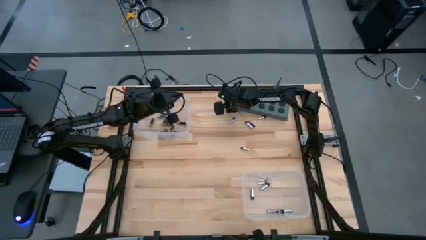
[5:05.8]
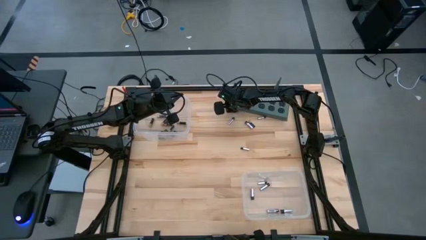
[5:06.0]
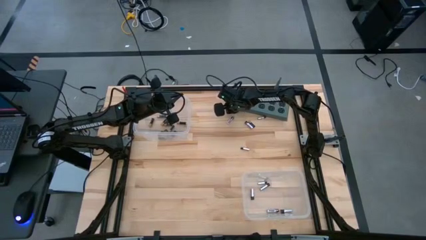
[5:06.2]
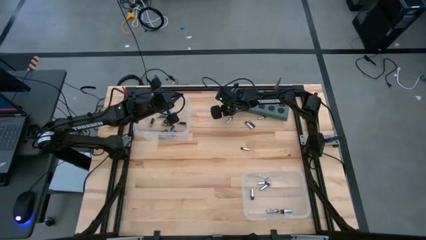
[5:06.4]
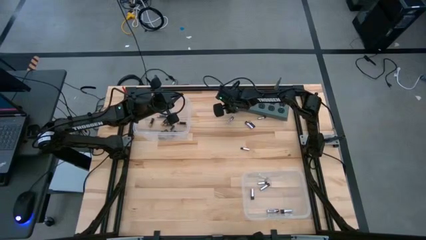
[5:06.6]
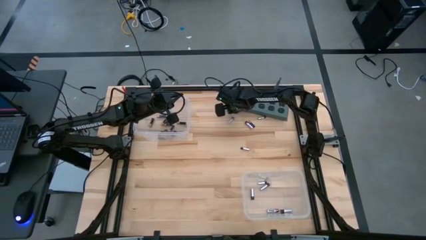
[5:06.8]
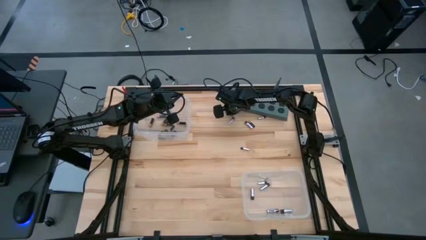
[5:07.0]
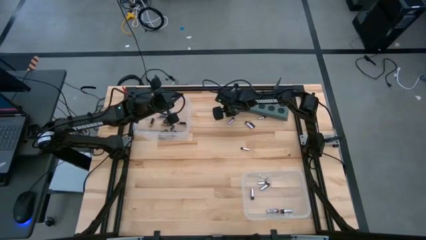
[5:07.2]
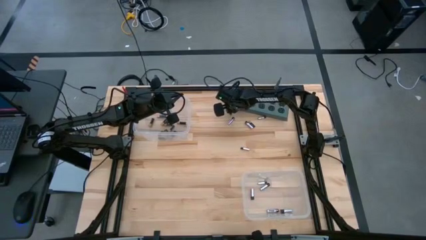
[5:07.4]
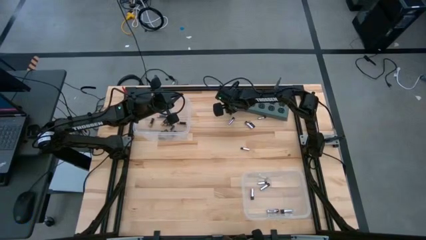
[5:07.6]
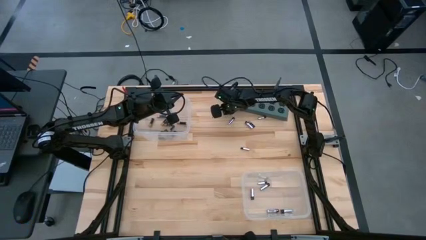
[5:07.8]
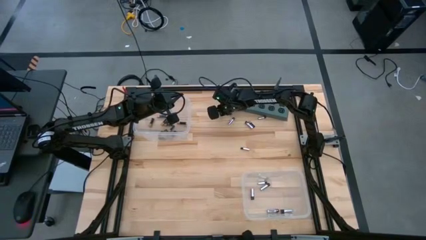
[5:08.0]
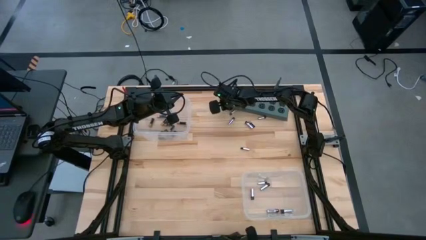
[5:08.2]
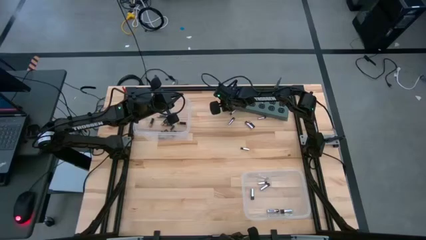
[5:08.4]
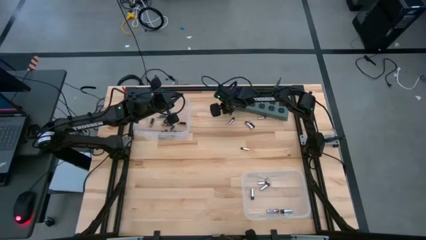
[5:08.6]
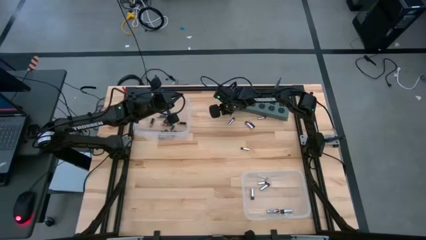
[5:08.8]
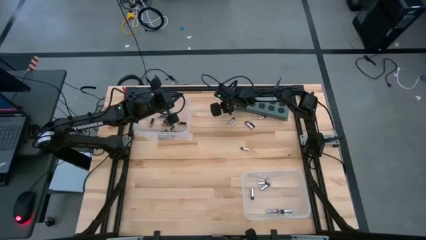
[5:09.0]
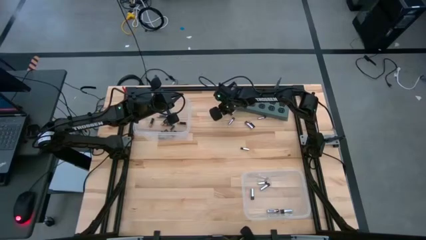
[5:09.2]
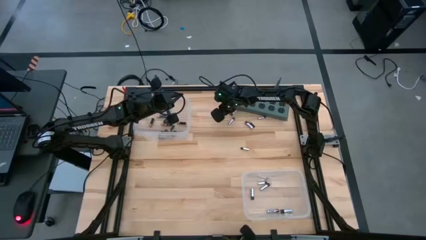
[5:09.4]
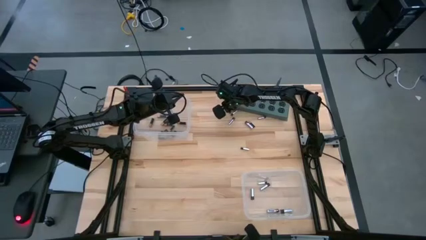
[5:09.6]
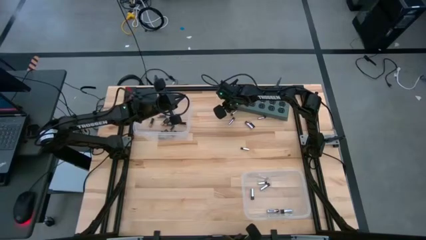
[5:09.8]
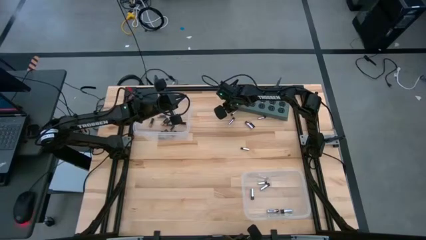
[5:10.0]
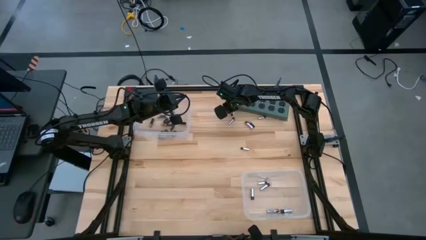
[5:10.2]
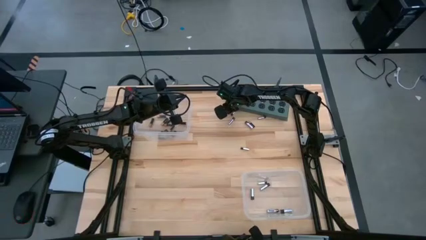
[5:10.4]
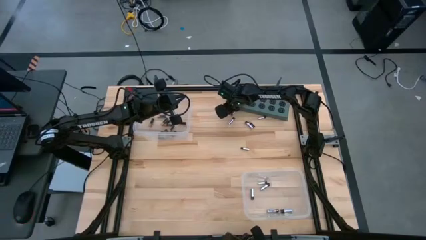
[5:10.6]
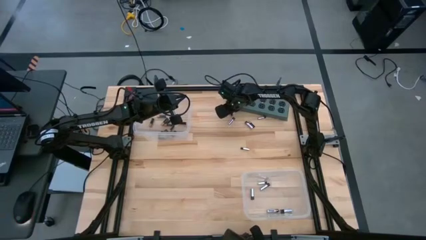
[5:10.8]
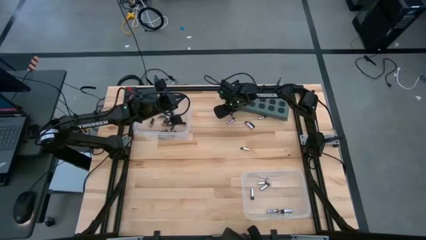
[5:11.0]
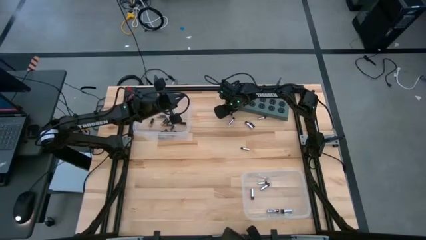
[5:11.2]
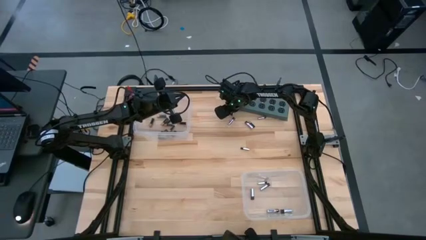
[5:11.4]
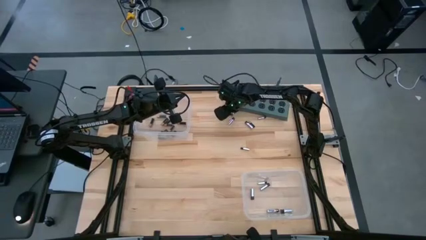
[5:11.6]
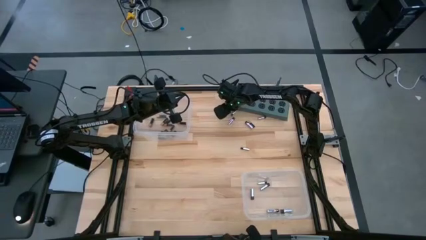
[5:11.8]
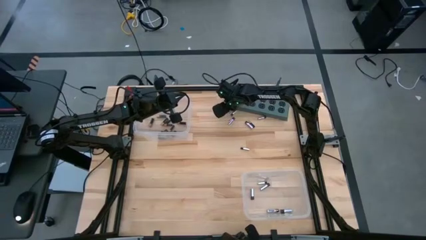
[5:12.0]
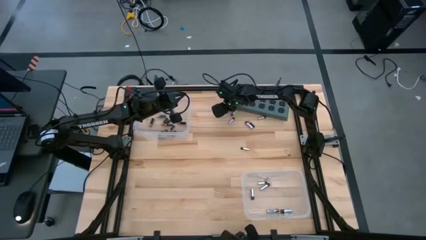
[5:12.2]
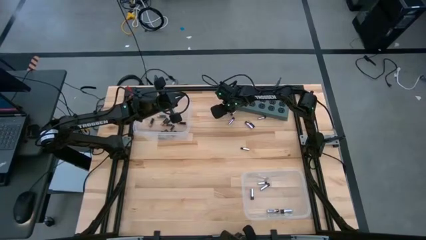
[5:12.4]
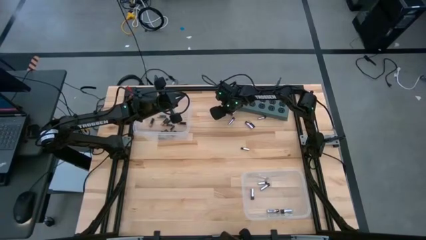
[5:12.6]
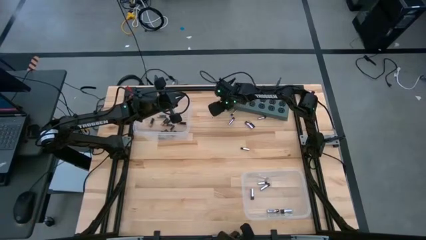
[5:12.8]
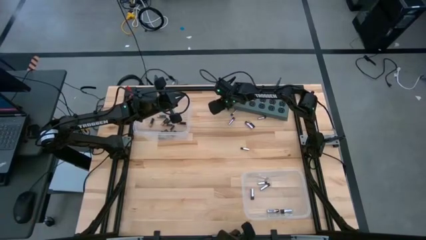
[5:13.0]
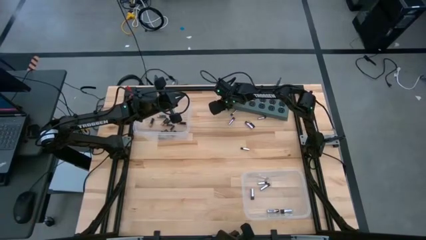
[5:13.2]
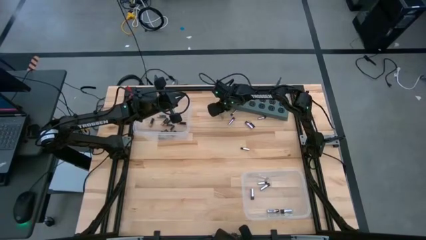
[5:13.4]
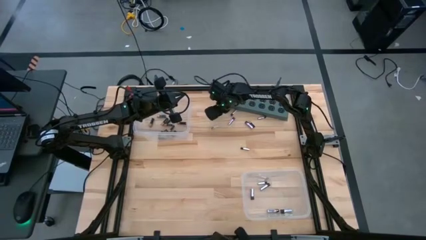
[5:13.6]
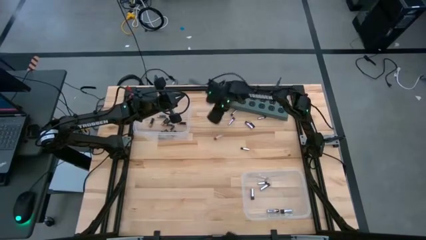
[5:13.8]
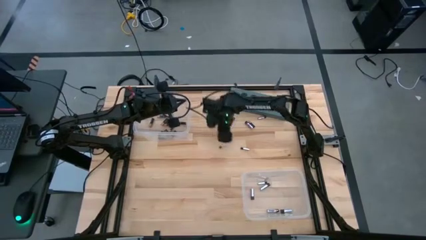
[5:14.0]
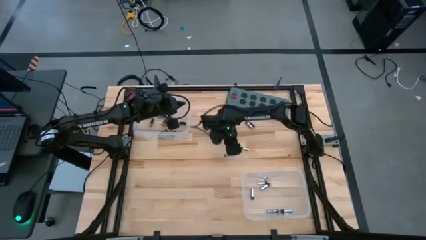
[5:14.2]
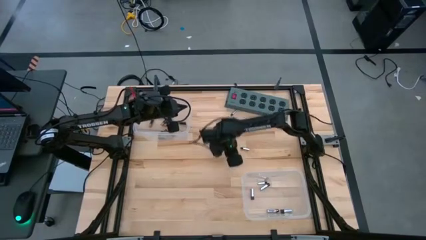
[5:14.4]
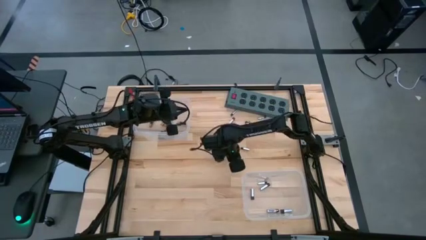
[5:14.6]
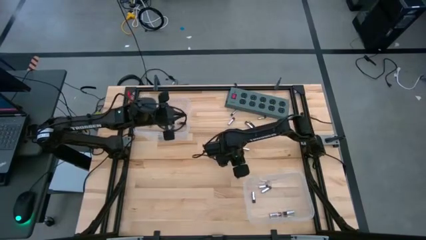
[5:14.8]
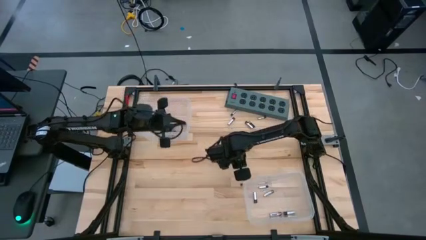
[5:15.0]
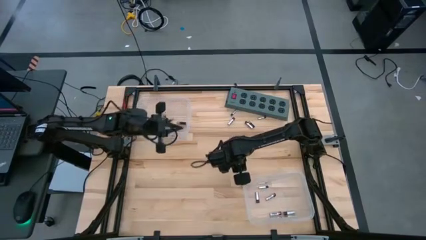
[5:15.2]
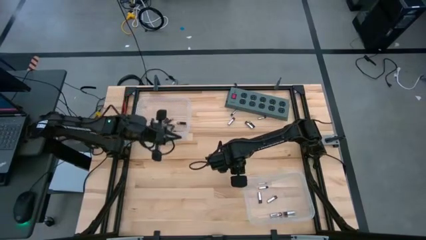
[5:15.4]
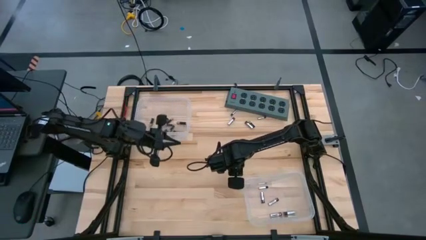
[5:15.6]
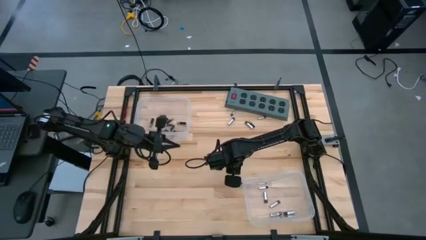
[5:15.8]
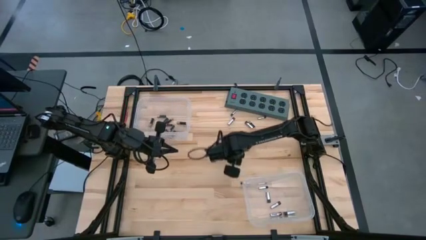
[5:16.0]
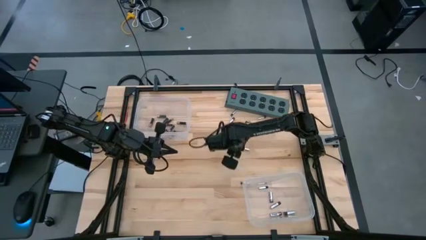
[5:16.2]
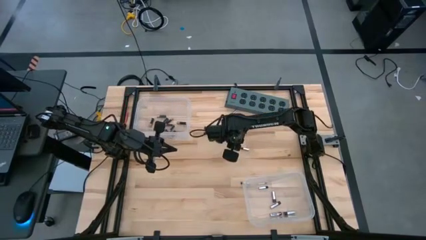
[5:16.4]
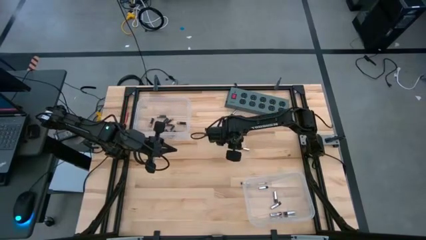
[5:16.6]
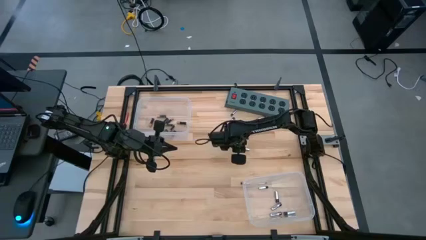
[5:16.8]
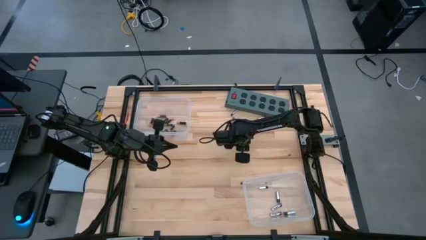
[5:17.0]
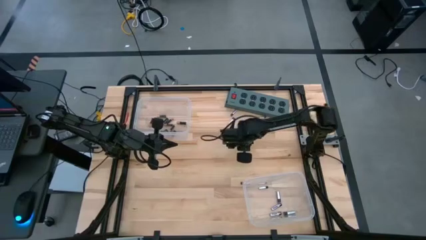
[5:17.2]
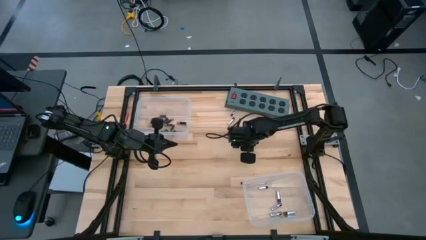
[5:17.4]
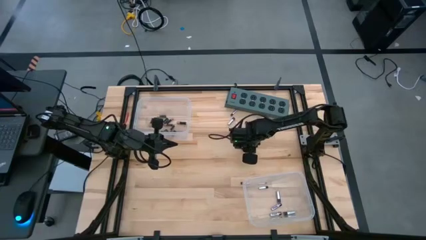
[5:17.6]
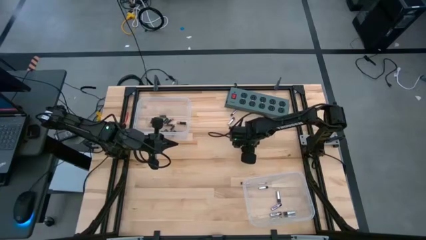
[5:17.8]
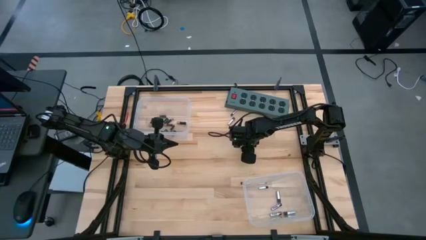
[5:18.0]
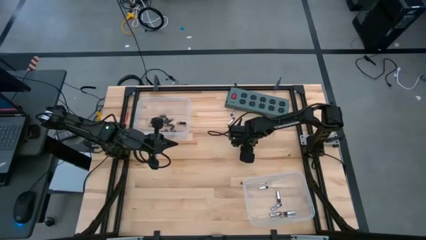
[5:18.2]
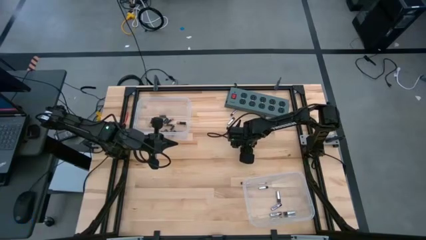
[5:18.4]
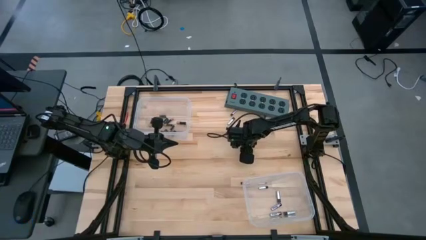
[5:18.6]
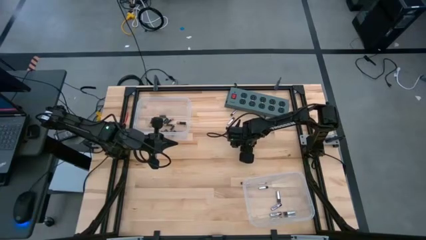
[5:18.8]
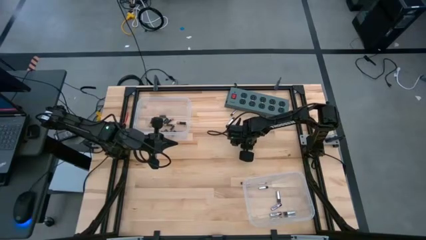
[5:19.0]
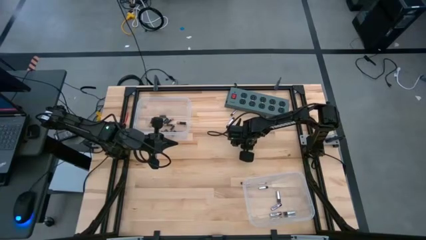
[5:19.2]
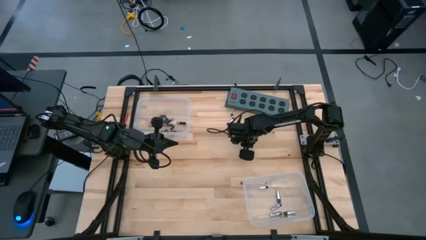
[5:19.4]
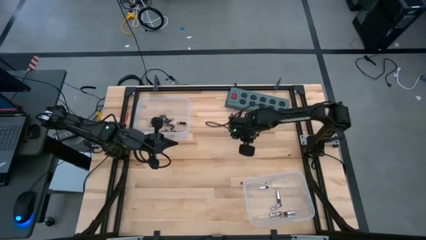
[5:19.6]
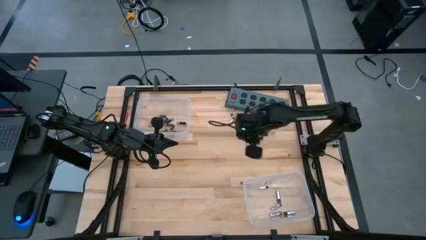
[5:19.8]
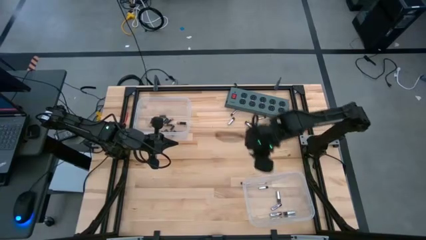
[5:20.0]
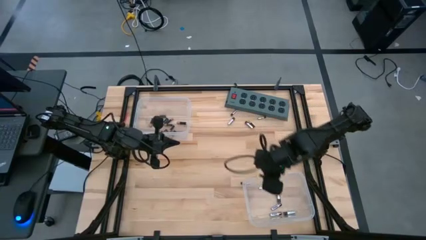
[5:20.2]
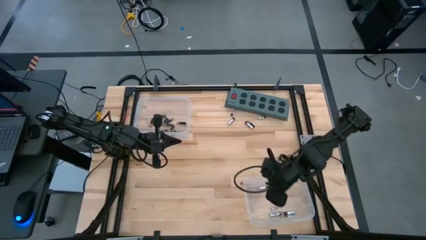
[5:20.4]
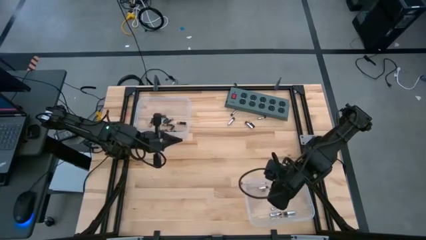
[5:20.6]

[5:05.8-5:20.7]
Task: Sort batteries
Put the silver battery into the bottom transparent bin
